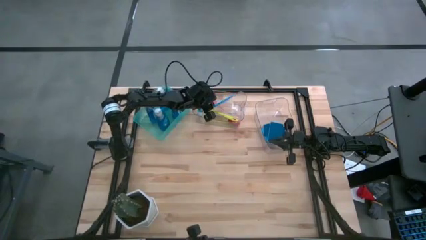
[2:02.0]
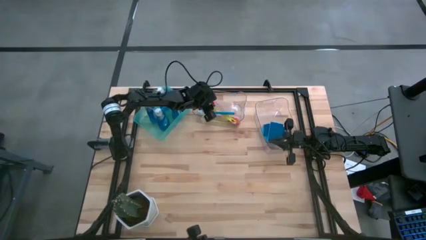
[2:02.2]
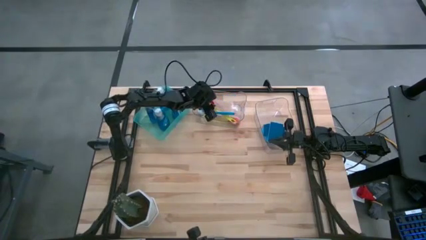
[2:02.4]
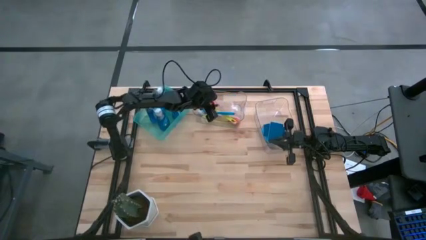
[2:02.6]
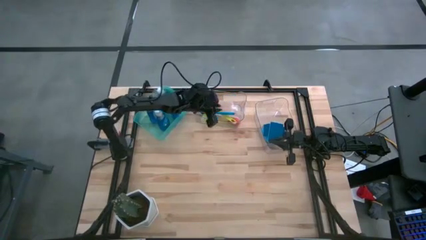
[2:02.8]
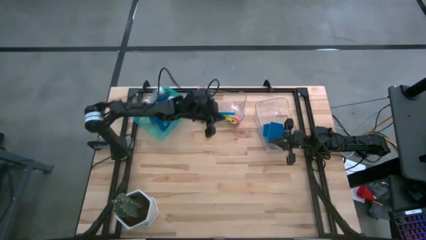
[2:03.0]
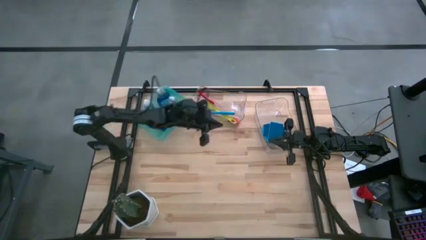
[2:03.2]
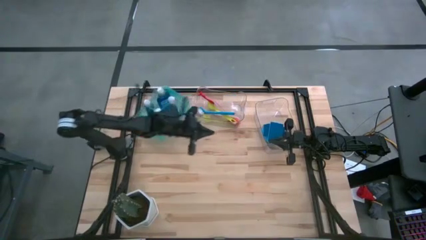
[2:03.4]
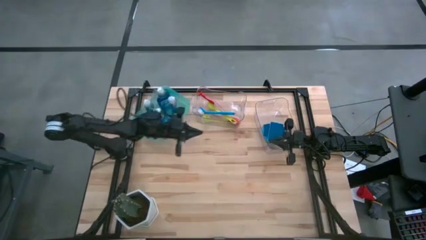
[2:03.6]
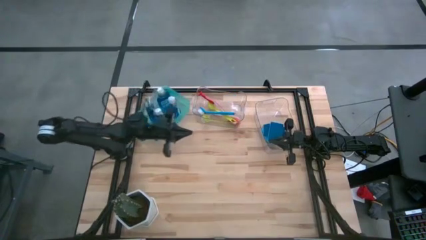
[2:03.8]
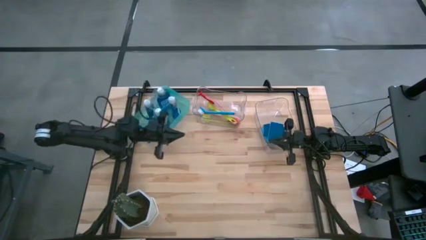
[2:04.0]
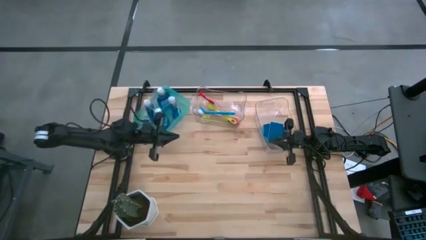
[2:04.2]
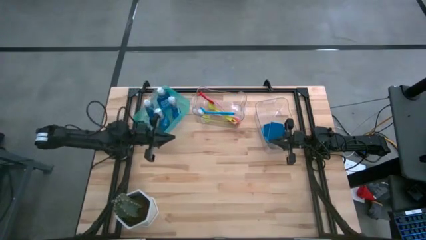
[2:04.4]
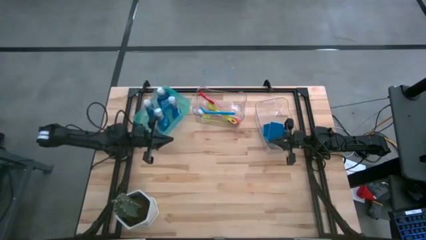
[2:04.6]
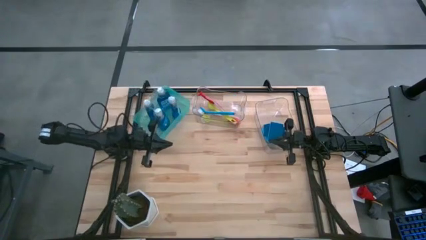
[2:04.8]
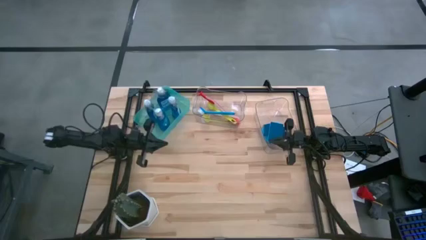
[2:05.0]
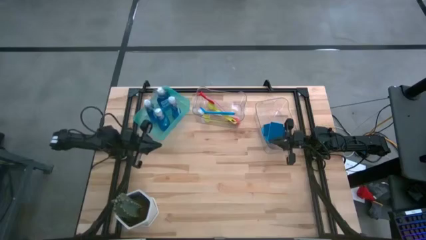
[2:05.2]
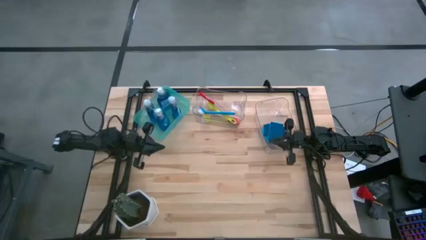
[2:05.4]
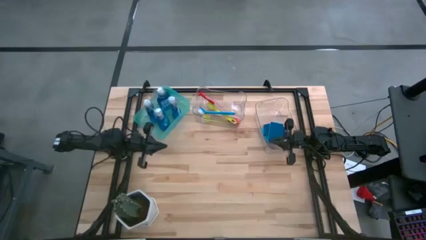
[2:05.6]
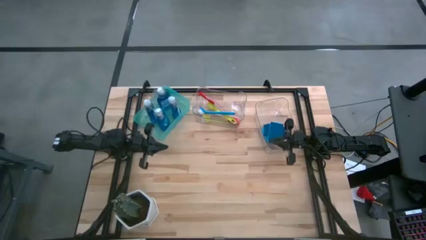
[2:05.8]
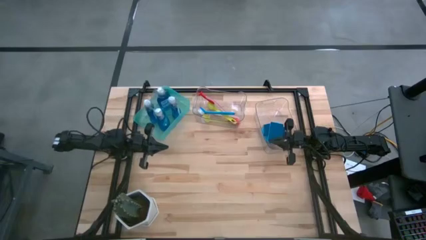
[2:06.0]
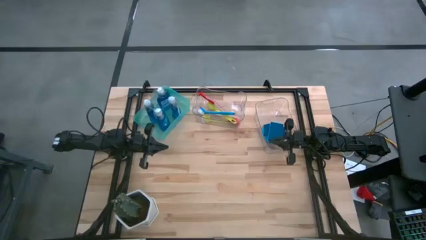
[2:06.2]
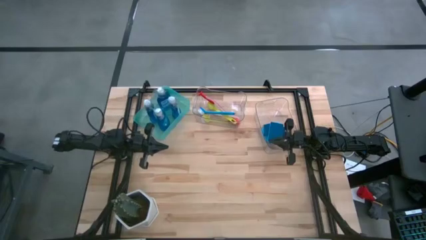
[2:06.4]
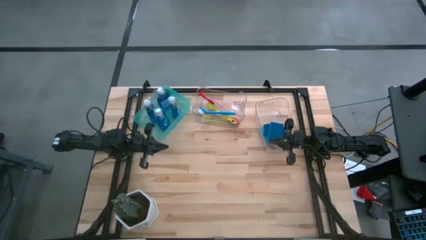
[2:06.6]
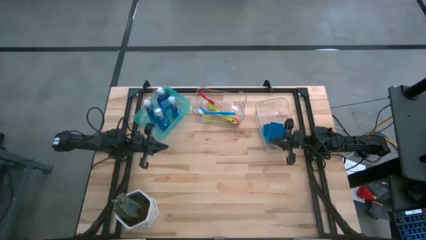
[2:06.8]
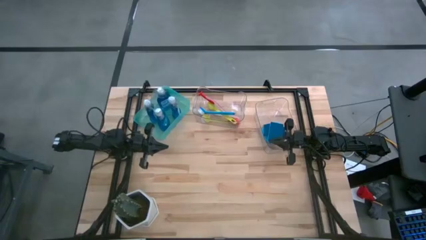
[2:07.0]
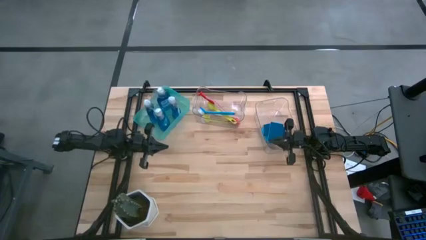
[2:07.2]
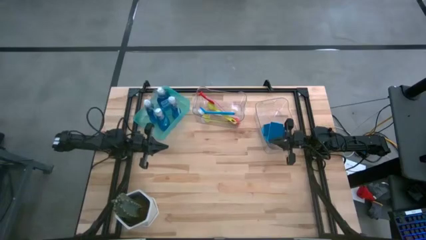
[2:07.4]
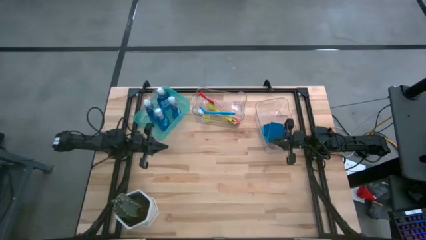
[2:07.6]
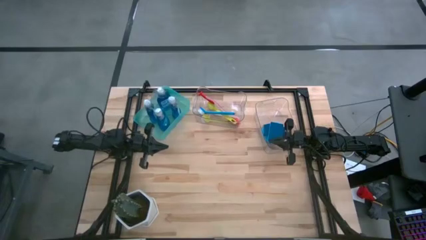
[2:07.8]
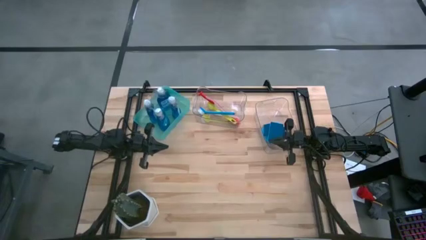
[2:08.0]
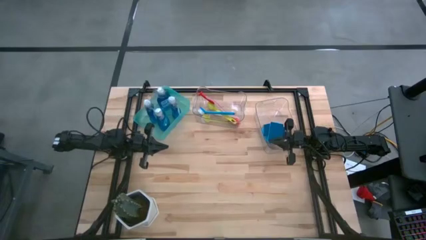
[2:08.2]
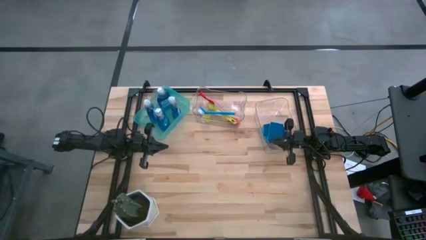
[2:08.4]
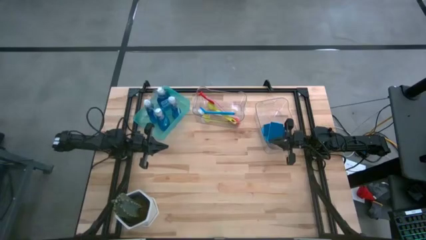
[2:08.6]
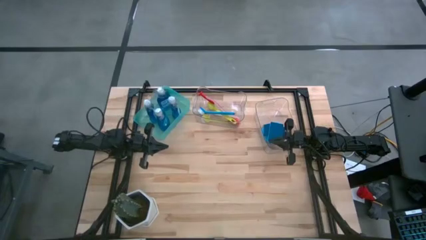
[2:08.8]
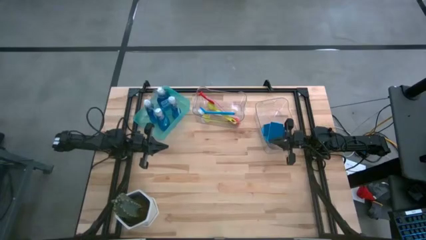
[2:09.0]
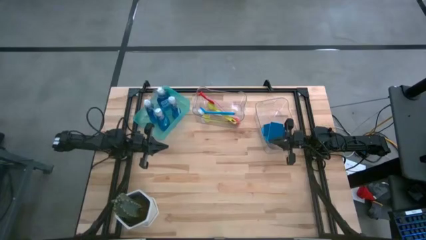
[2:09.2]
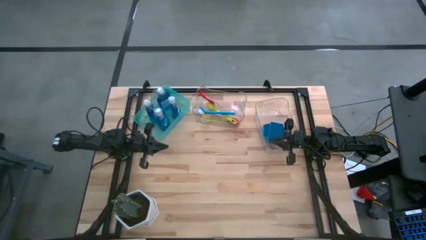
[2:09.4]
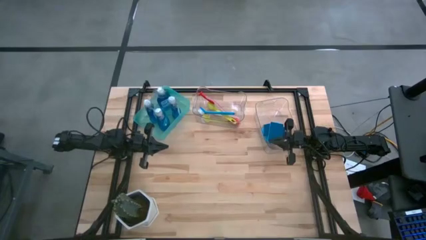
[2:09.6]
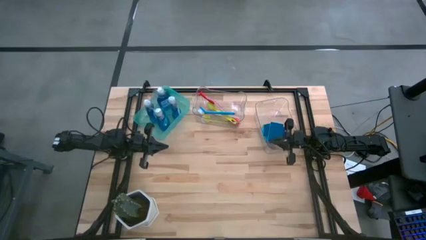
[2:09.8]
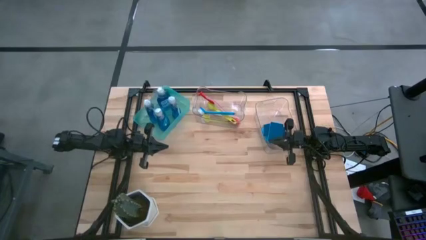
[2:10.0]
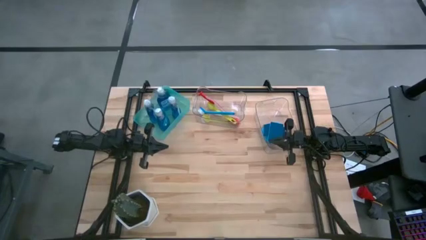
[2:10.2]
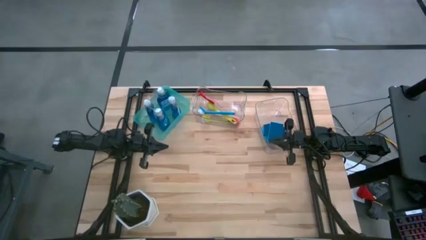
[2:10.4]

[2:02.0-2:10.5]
Task: Pick & Place Kitchen Sink Supplies
Return to Home Position
